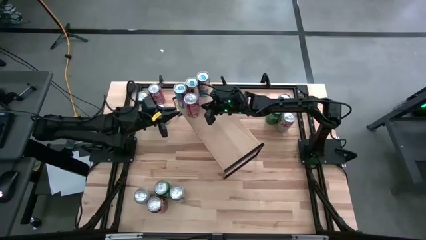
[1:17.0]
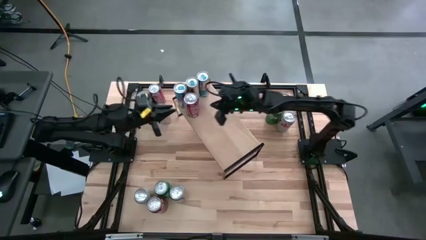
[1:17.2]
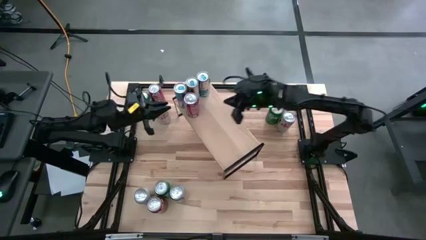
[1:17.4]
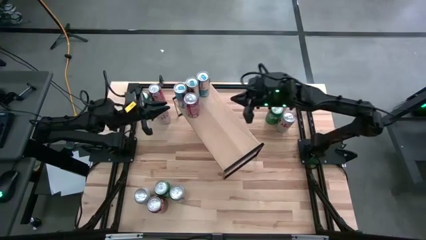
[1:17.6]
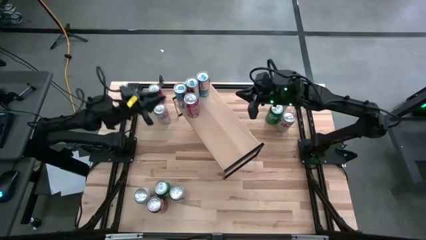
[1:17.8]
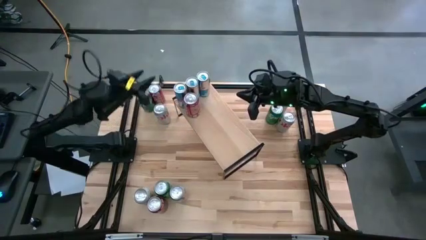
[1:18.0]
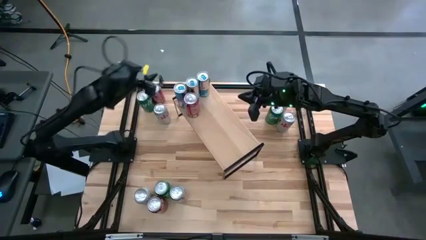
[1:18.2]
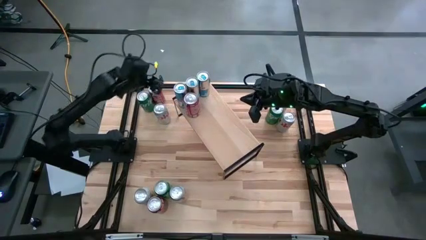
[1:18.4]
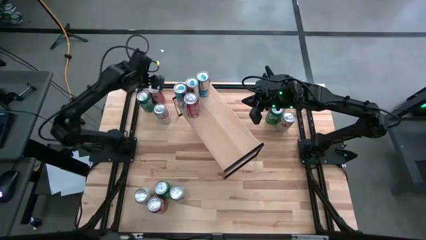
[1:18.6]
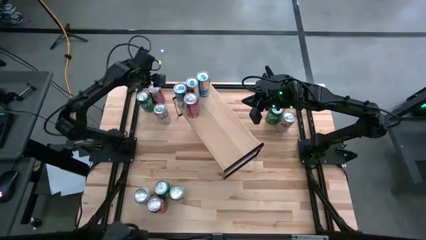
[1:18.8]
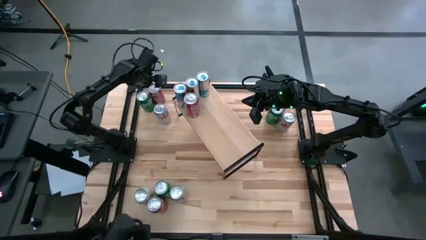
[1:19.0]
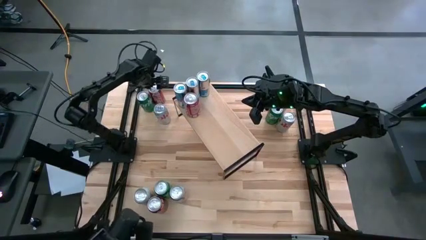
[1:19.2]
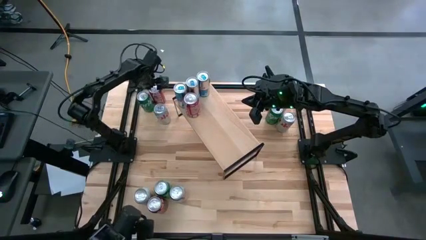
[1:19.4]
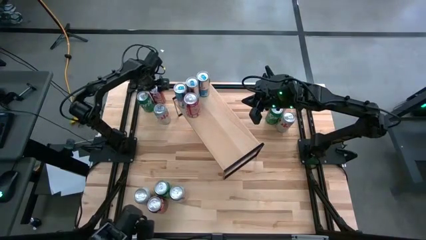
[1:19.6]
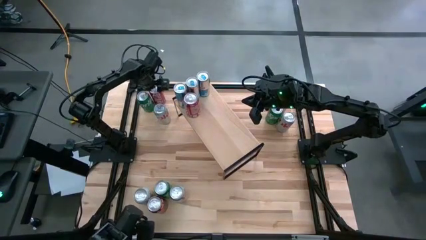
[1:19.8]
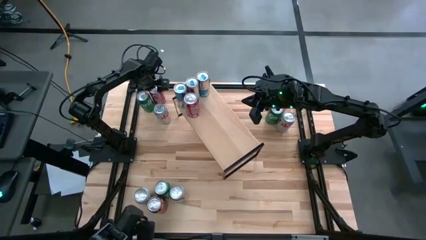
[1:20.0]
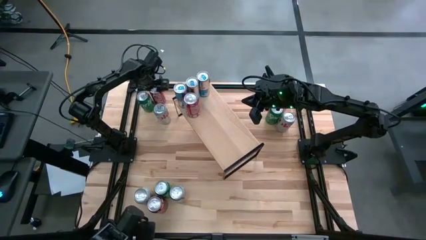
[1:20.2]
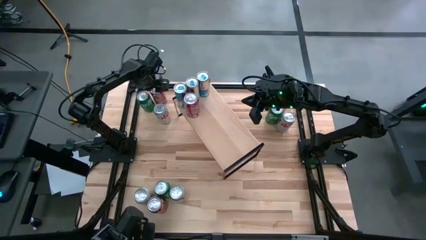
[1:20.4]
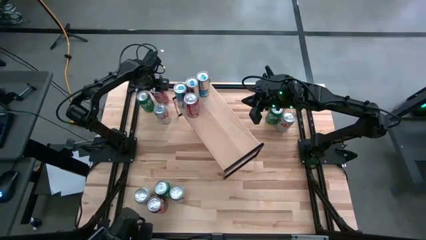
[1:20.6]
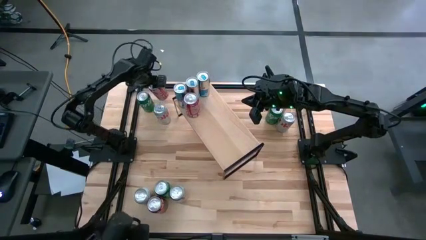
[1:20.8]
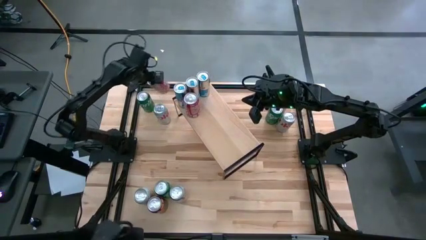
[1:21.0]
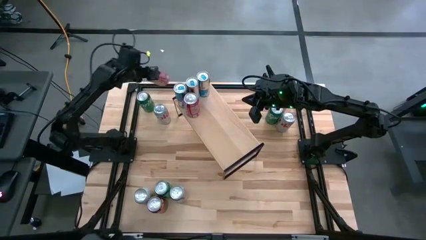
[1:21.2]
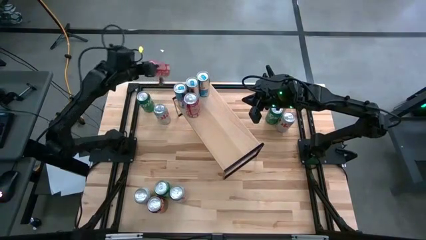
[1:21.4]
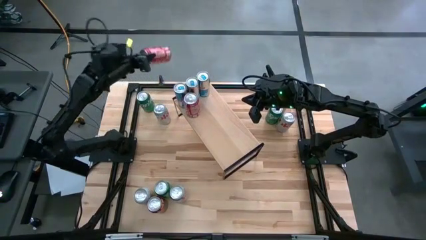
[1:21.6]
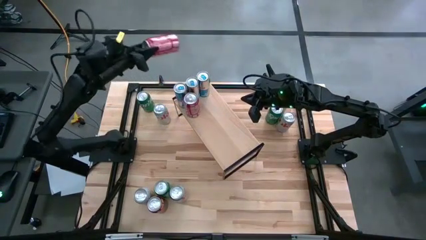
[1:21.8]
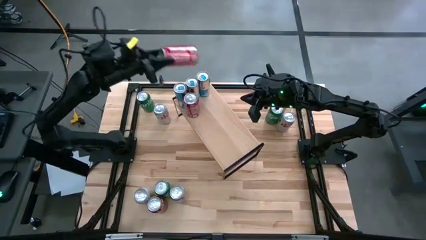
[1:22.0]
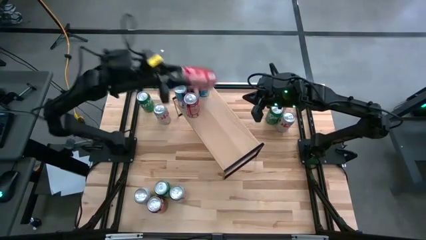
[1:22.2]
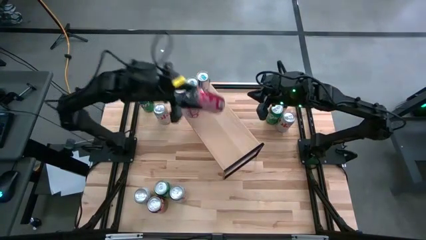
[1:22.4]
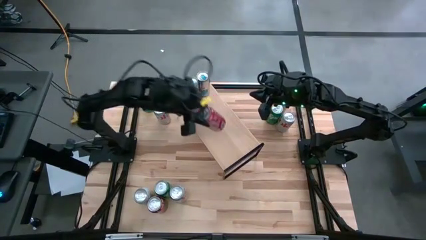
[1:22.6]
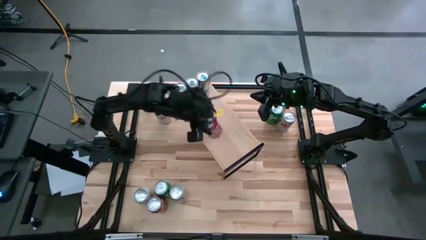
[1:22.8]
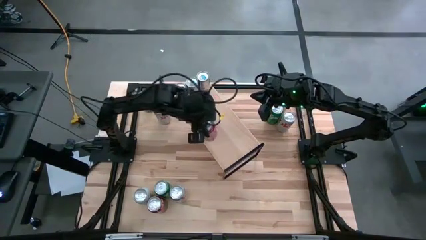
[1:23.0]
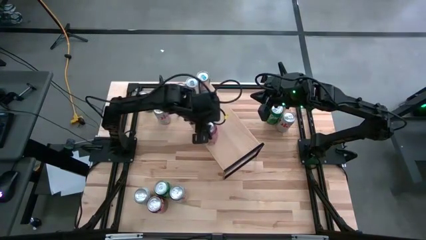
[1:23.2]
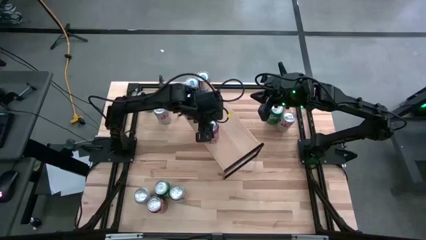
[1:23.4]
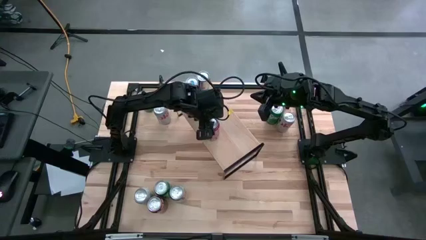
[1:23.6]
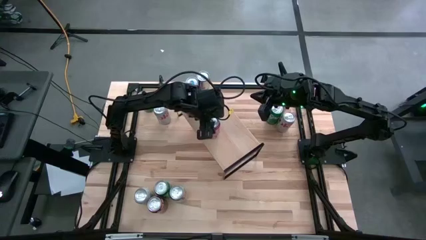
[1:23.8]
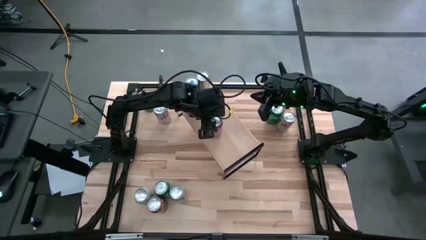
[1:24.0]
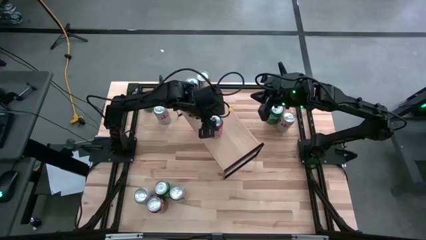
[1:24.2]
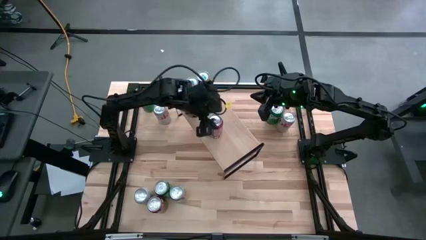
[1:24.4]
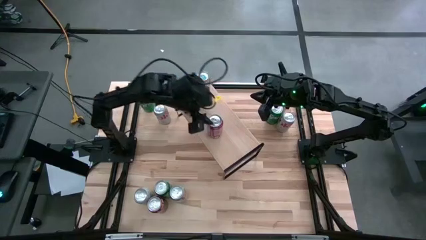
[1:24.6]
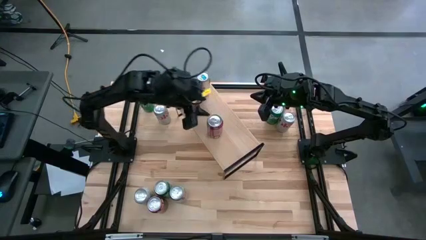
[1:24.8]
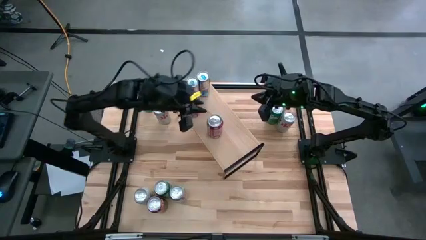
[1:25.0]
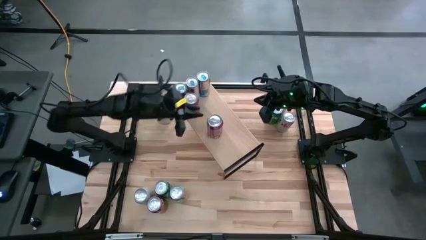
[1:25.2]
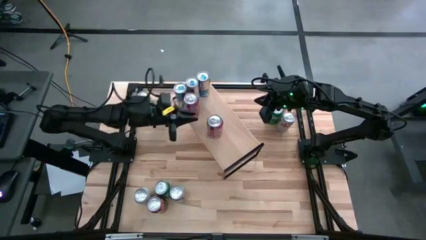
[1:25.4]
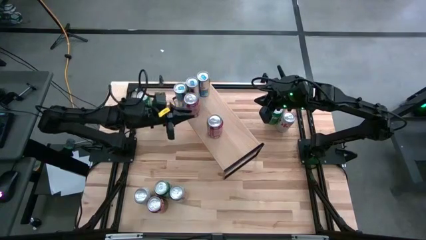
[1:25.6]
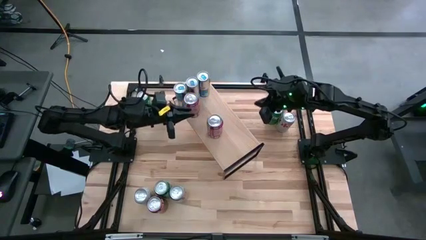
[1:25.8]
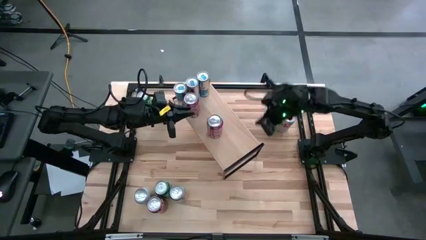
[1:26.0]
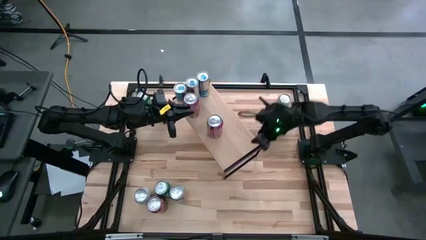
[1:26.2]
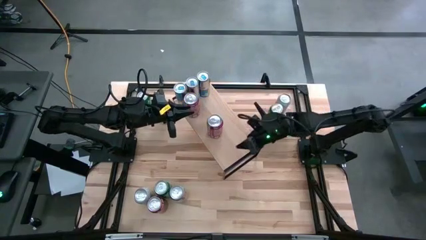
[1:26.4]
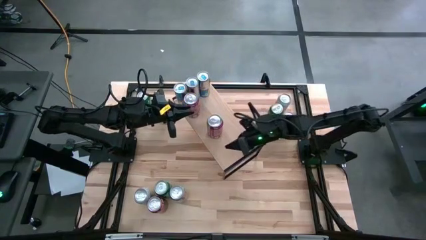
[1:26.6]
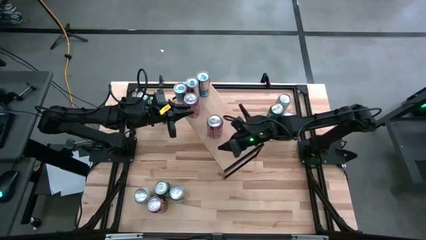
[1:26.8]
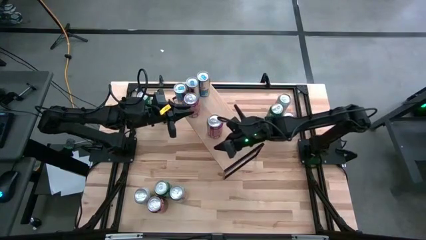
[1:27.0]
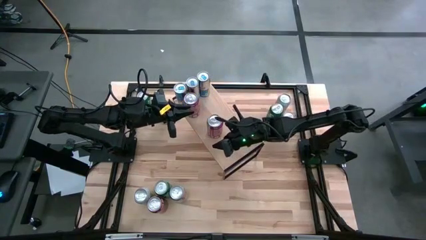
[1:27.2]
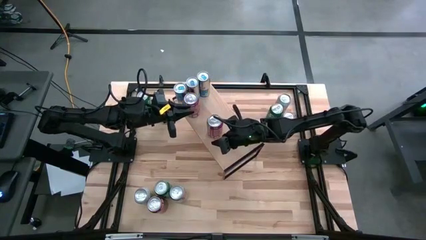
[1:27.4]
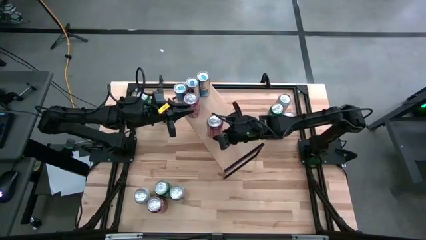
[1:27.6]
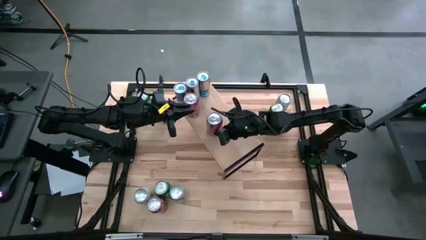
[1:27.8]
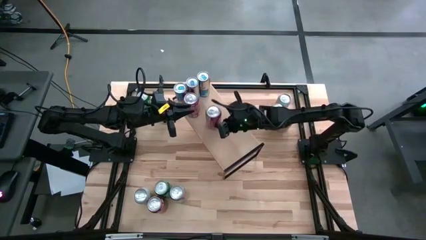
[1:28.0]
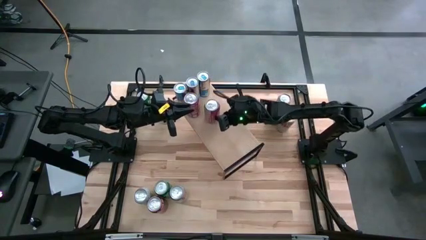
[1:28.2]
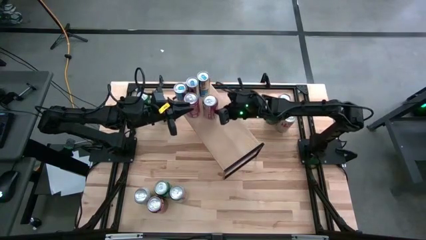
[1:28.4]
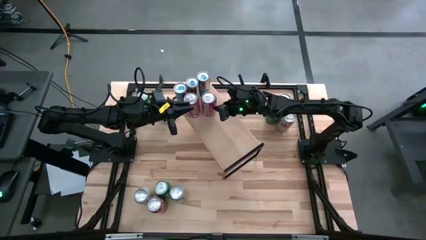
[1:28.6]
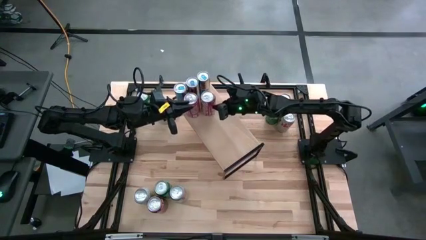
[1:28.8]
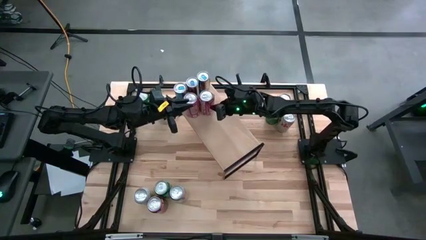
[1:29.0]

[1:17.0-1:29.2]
Task: Place canned beverage on shelf
Put the top red soda can on the shelf aligned with the other red soda can
